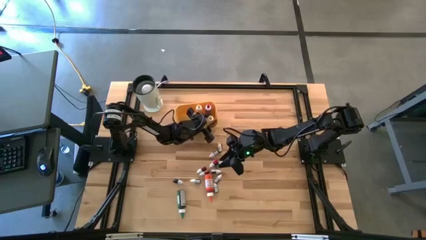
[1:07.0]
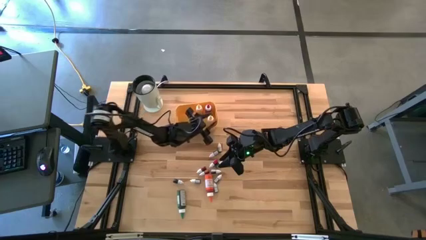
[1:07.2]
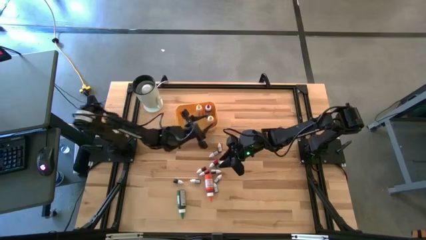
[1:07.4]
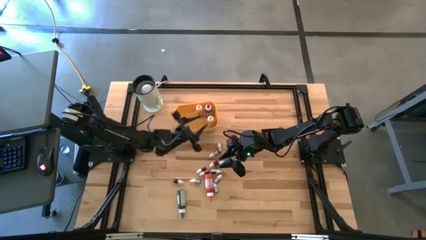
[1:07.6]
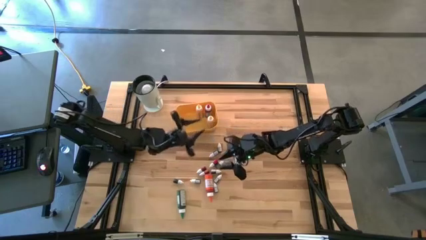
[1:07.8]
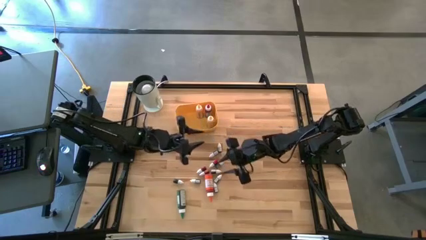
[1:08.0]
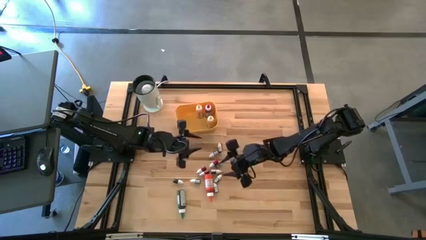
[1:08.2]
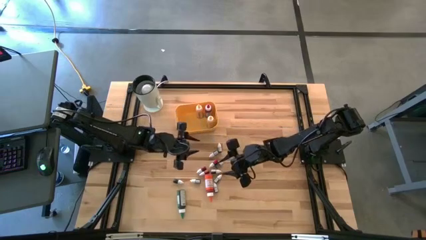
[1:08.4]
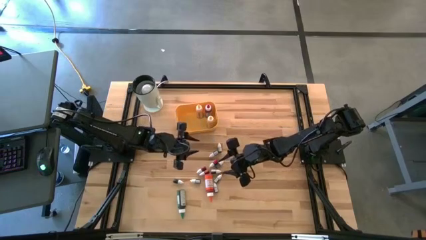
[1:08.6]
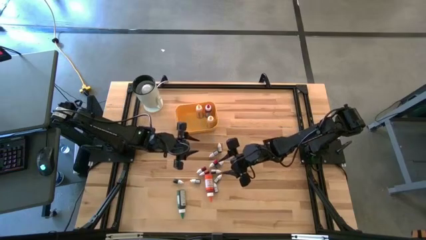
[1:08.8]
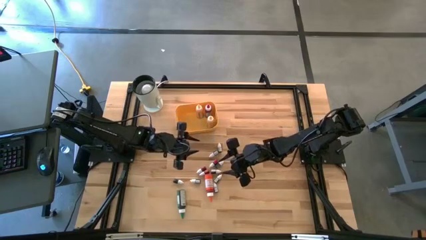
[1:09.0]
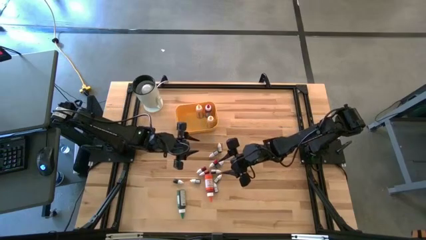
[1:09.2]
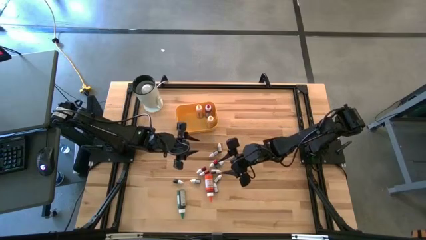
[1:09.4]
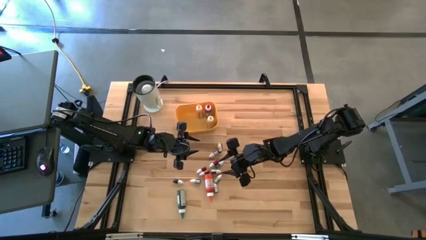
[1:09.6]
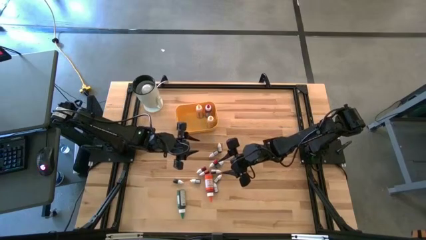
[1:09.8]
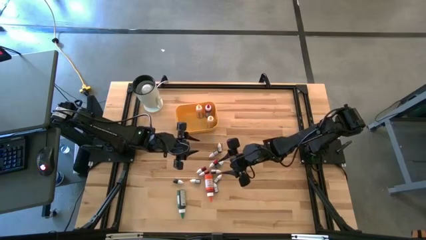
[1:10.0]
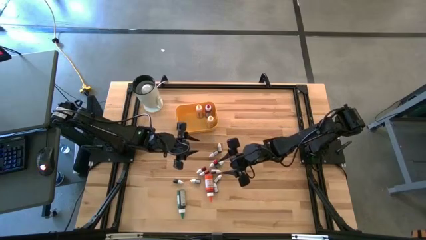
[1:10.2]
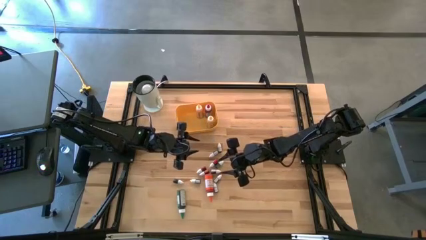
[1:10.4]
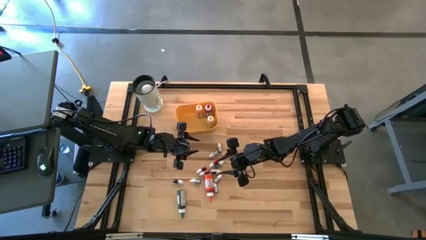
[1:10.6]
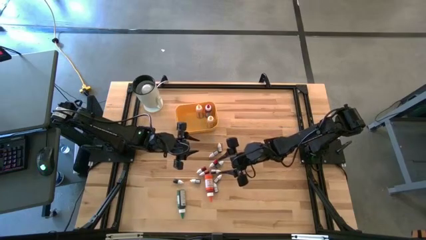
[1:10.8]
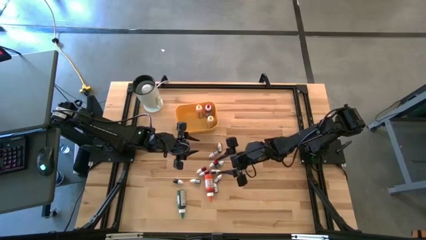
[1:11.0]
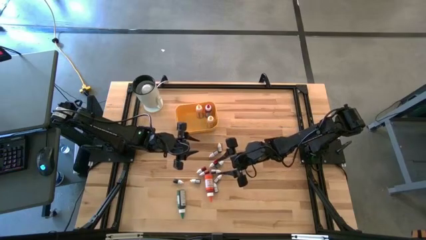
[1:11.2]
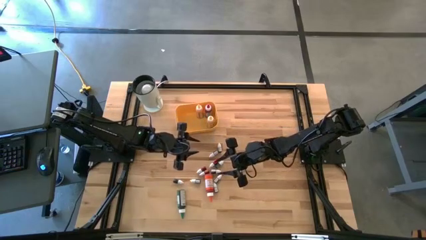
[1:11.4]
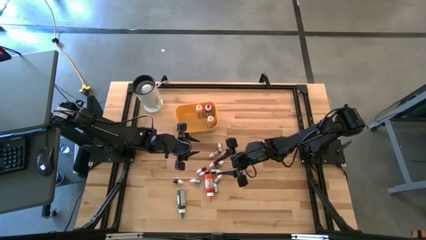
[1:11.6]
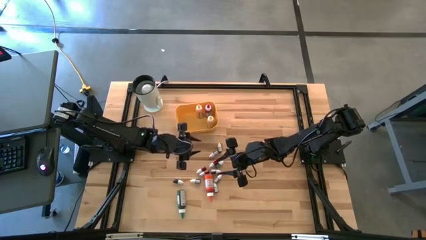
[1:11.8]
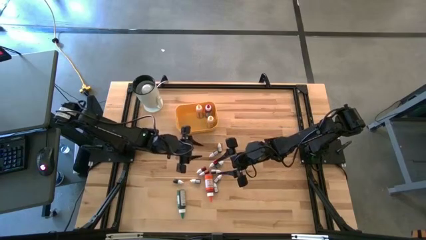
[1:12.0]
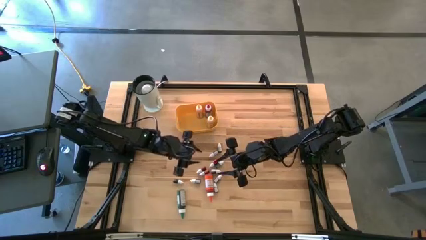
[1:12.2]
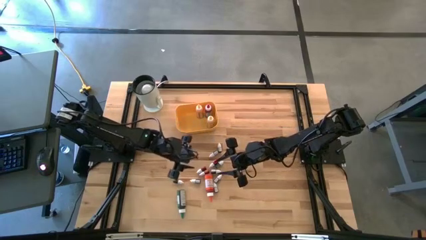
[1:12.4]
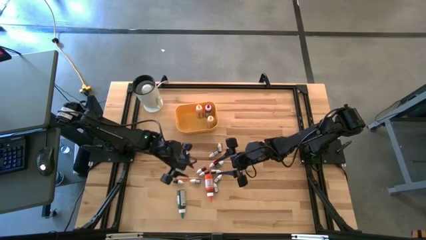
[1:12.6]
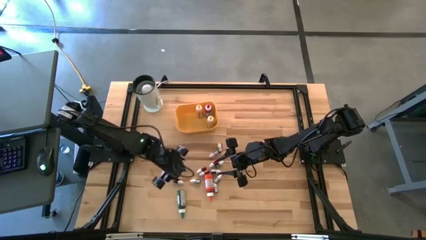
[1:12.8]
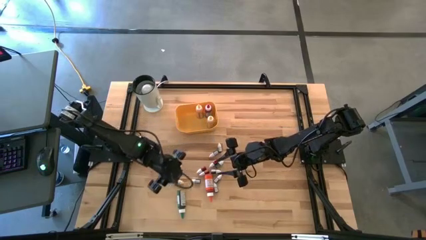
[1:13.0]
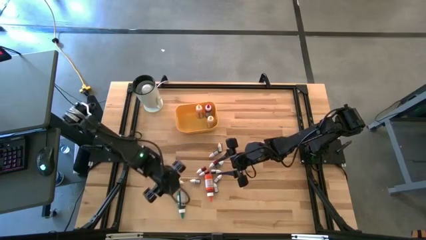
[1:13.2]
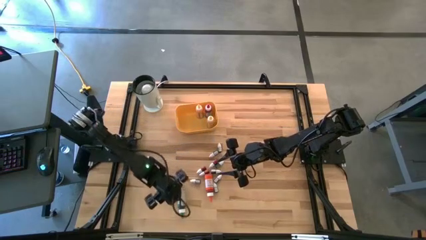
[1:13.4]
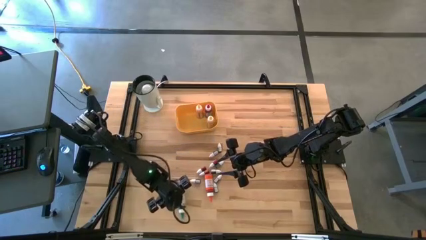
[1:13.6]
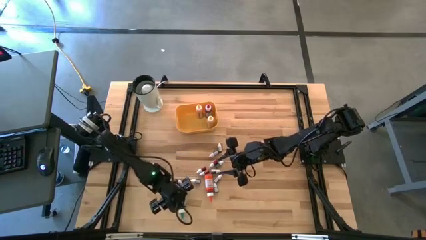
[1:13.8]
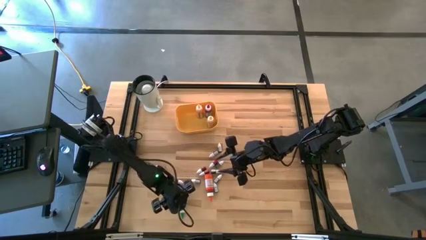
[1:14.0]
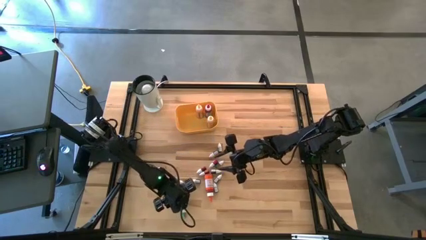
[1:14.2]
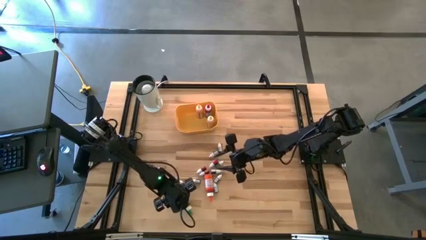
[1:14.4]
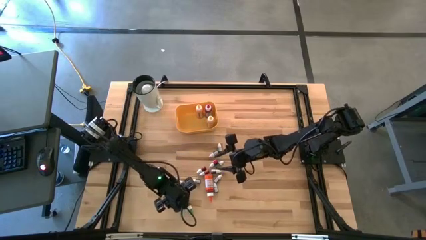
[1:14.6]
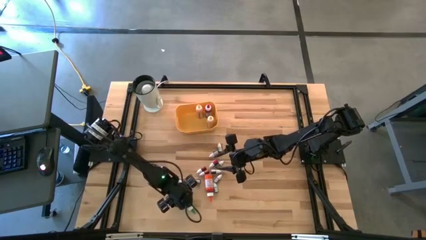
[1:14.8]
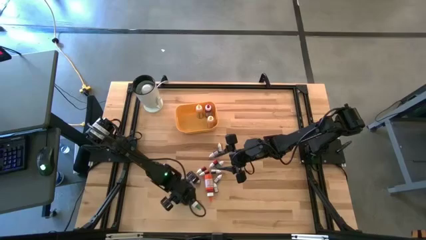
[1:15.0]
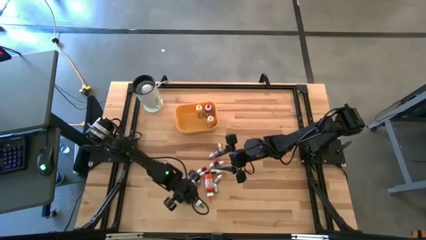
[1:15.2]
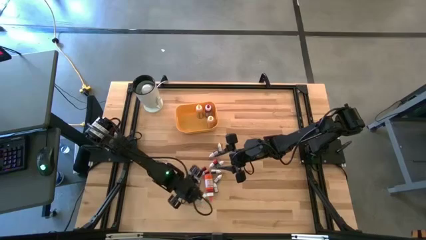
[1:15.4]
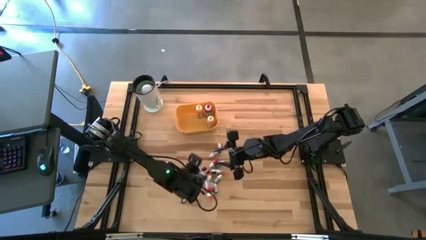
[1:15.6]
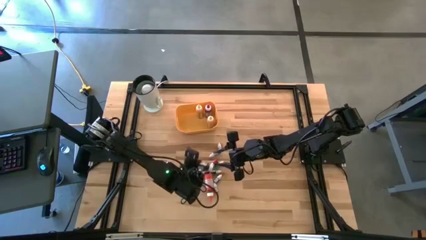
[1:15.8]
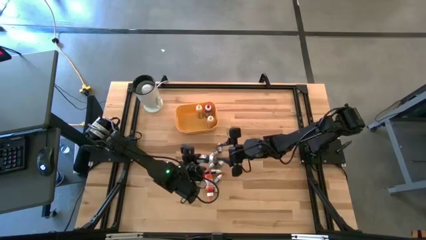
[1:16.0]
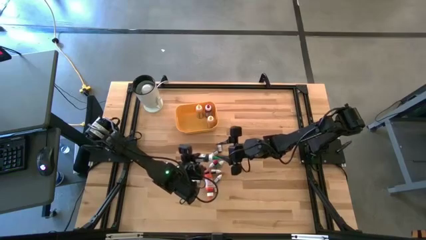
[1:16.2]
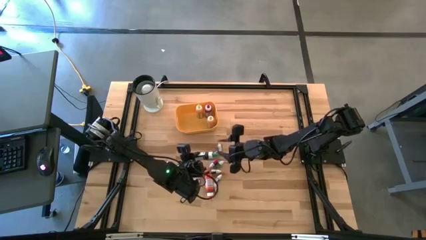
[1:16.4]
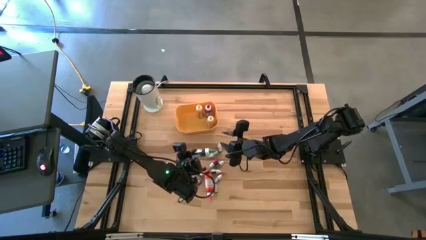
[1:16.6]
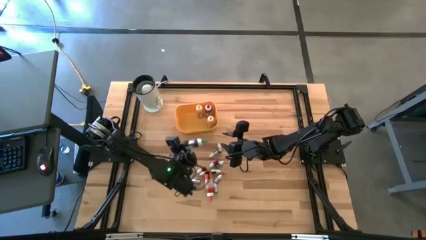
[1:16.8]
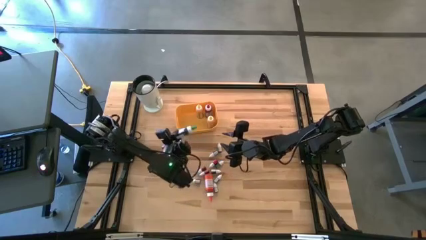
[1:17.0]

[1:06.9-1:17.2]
Task: Pick & Place food coloring
Put the large green food coloring bottle into the yellow bin

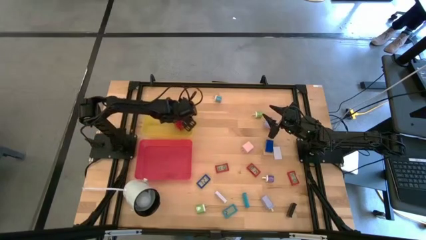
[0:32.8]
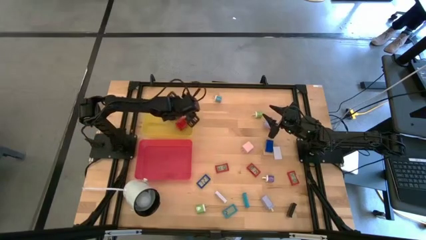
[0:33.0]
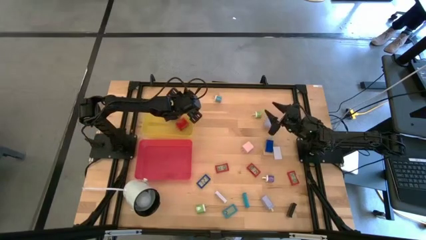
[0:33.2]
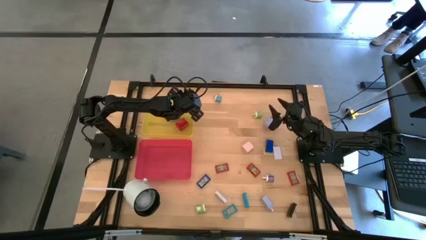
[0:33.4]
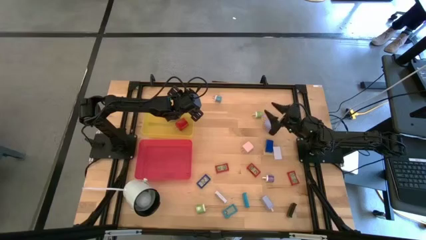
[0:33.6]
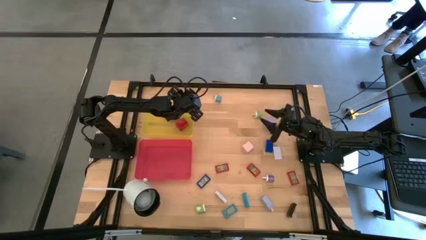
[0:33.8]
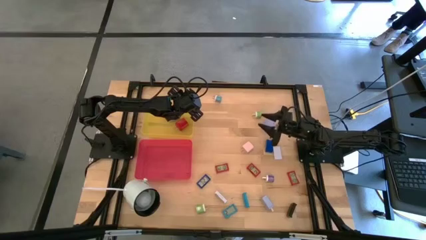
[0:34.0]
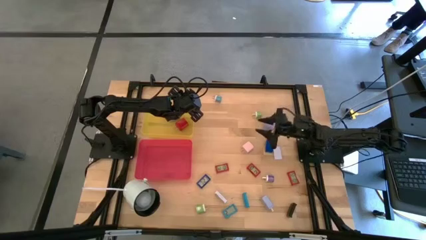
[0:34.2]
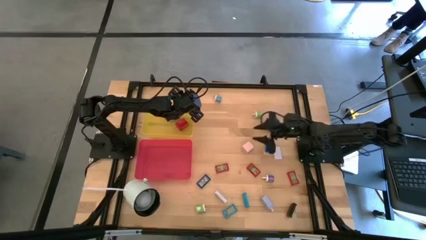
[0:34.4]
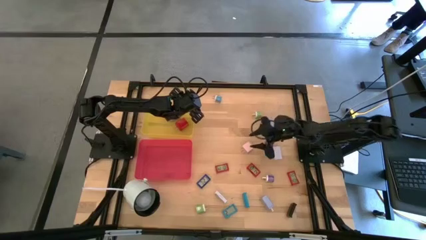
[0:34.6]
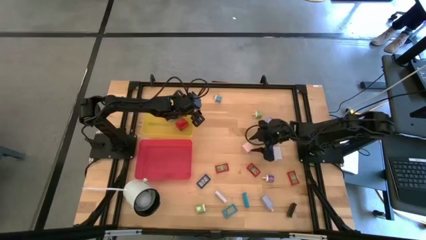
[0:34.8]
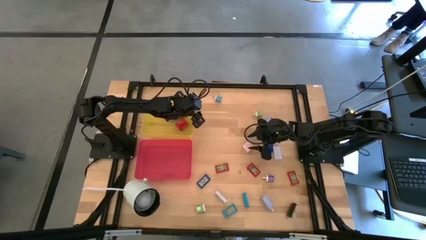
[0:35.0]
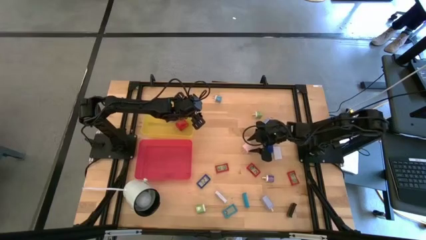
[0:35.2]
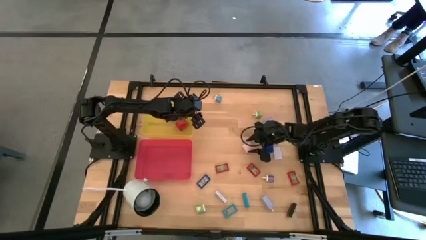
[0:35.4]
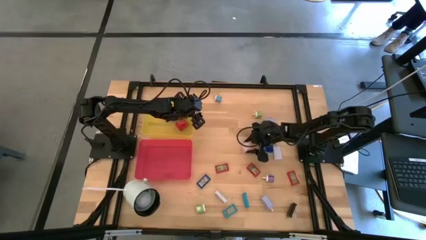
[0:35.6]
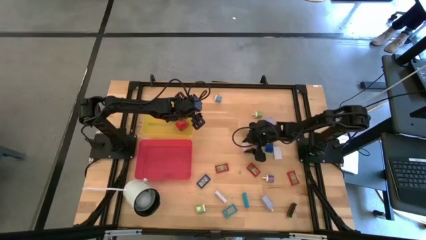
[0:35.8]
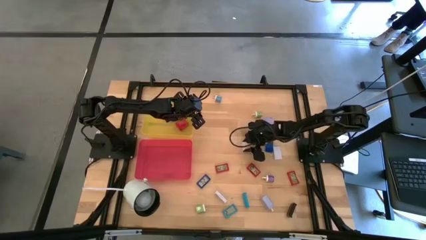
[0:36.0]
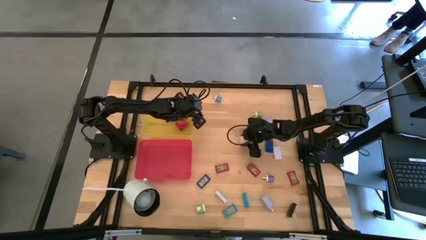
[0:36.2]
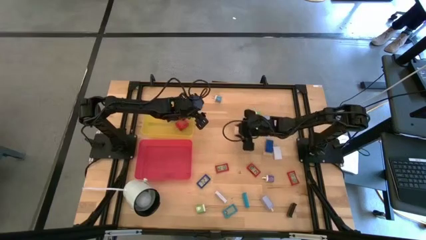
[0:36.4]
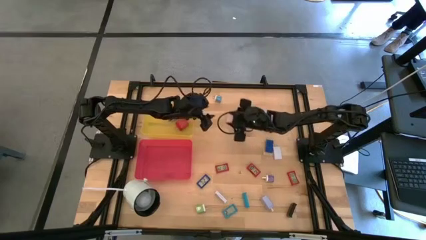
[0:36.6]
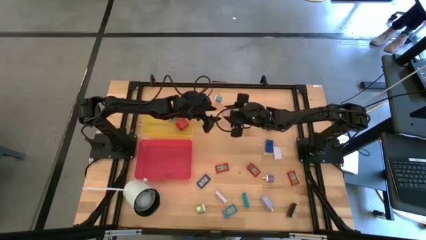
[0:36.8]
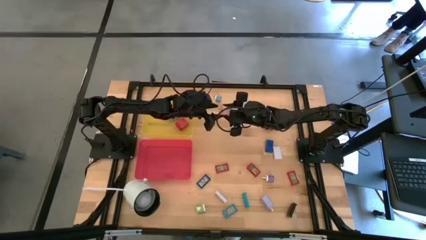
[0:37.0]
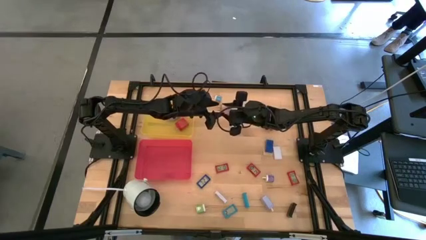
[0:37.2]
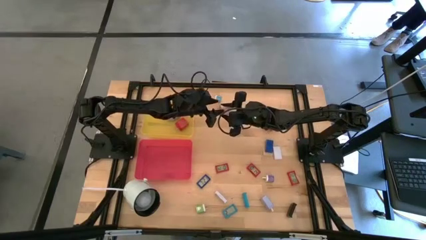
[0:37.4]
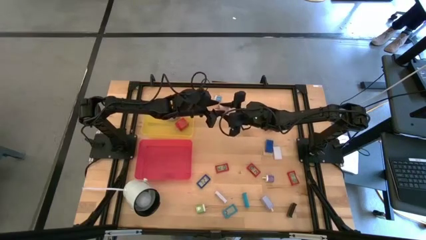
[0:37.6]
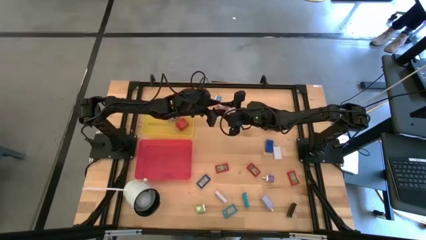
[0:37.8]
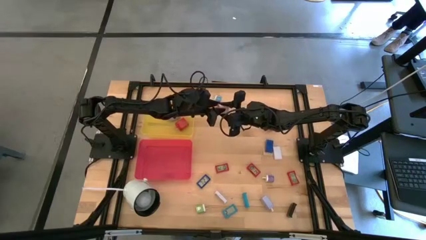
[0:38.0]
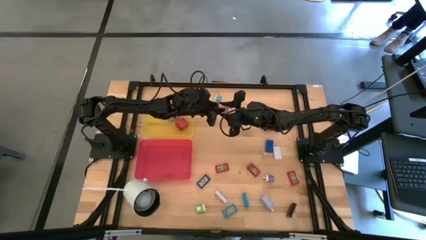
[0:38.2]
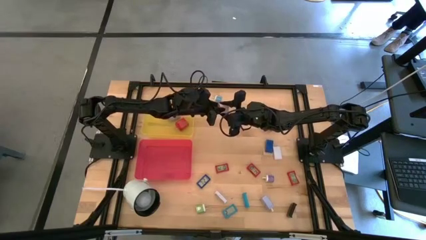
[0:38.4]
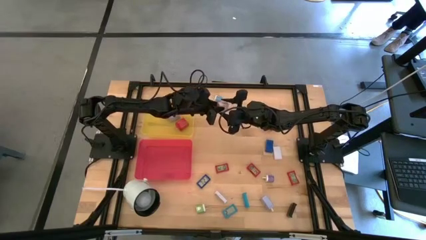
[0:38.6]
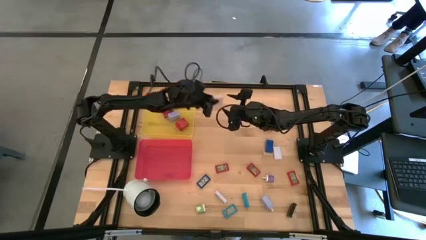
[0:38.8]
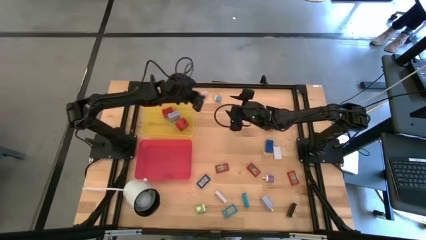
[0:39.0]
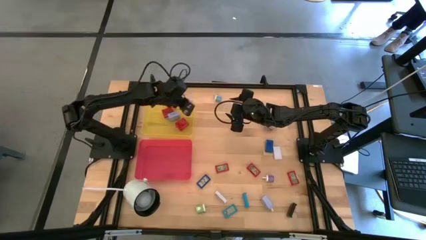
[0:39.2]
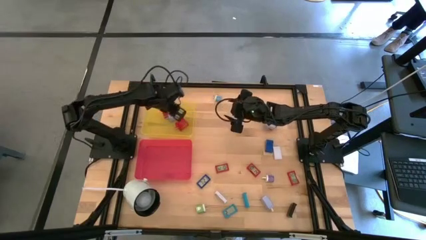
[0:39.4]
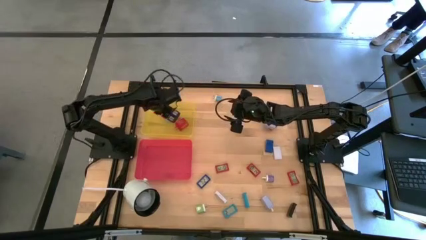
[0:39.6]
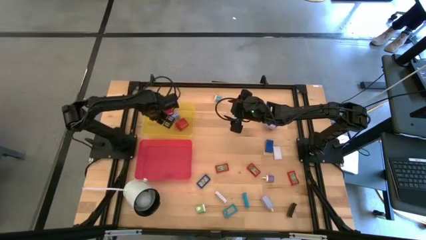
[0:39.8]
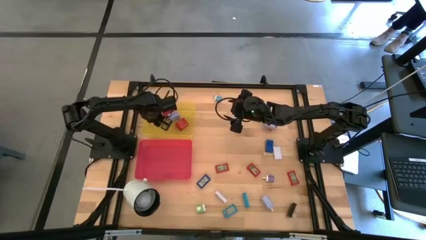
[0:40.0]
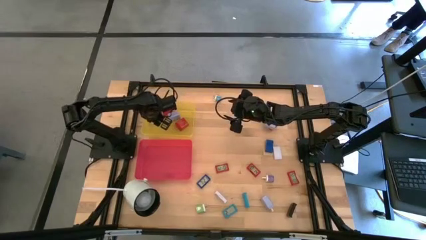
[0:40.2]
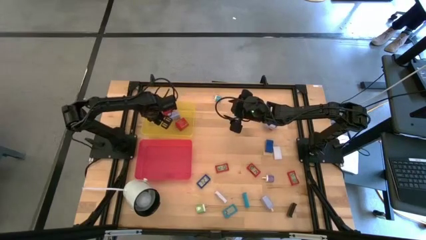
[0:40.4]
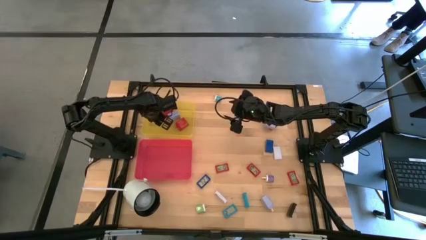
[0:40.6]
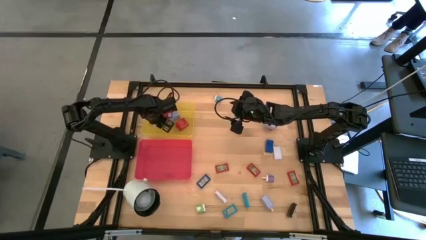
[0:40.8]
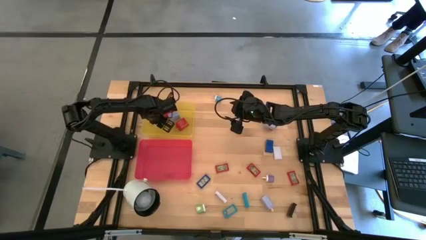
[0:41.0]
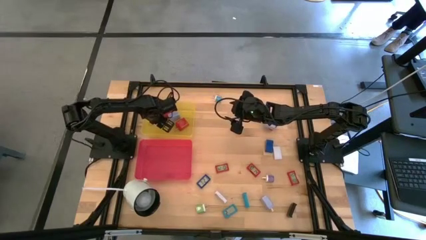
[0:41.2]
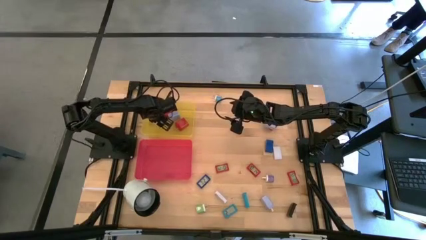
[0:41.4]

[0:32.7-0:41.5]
Task: Pick & Place Office items
Put the pink charger adapter into the yellow bin
